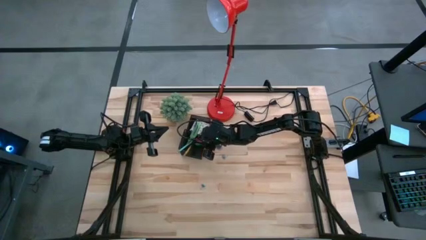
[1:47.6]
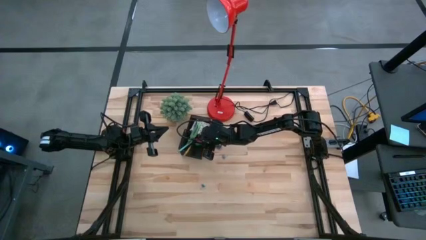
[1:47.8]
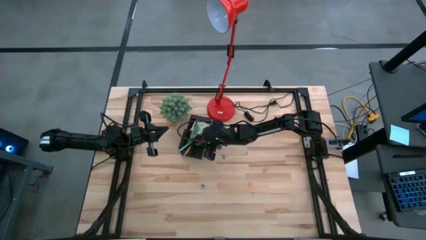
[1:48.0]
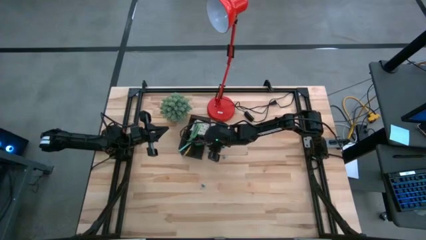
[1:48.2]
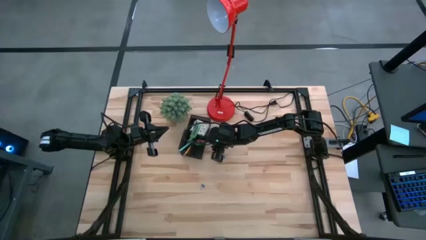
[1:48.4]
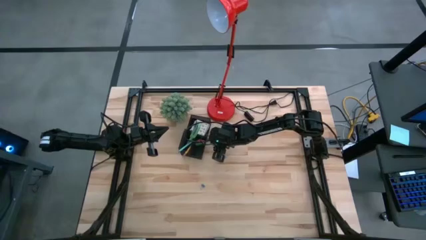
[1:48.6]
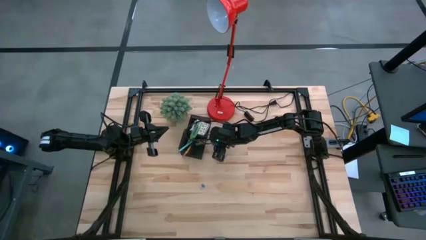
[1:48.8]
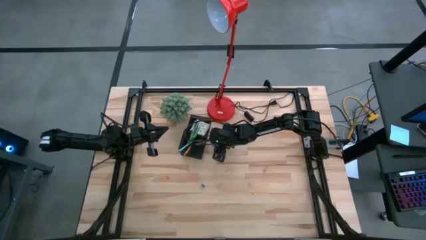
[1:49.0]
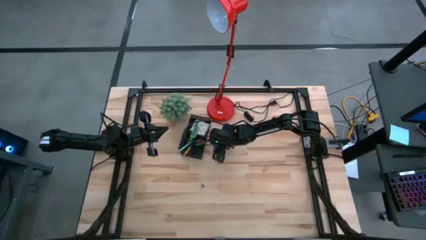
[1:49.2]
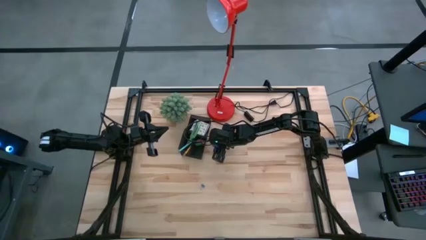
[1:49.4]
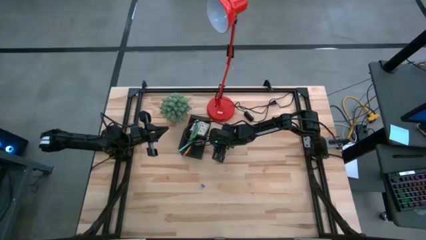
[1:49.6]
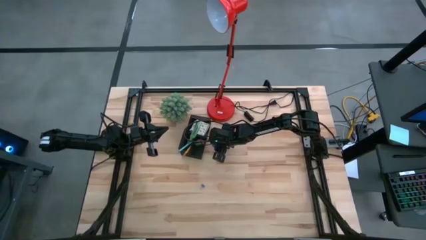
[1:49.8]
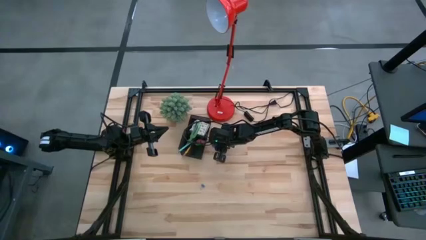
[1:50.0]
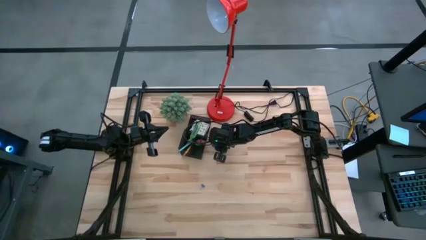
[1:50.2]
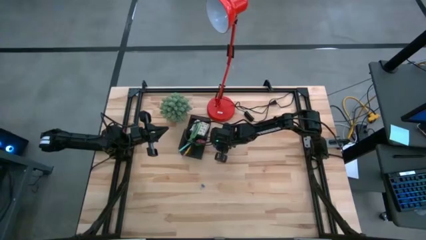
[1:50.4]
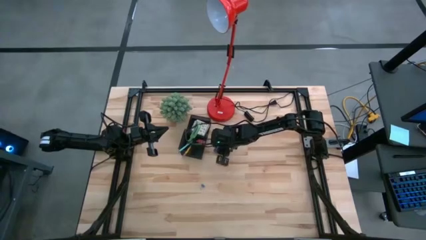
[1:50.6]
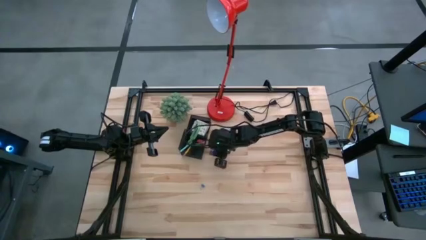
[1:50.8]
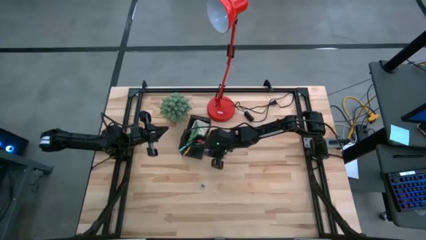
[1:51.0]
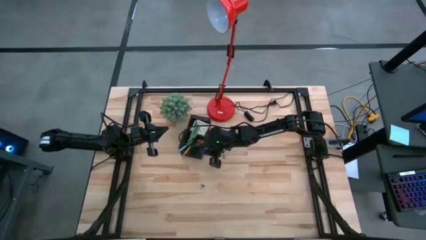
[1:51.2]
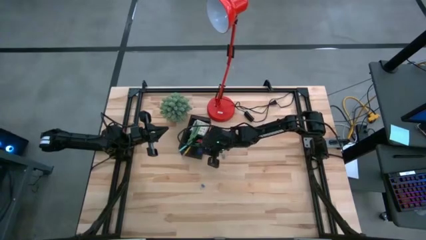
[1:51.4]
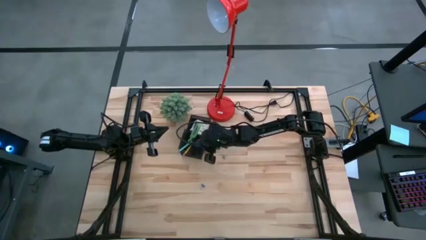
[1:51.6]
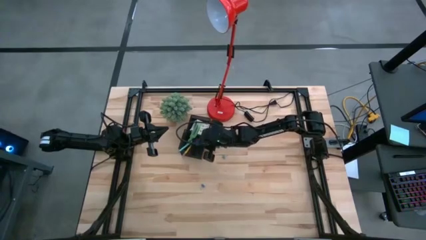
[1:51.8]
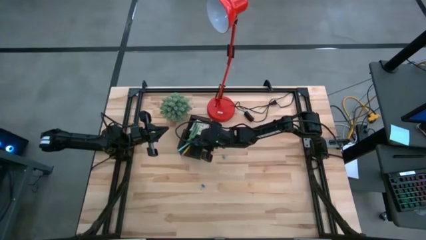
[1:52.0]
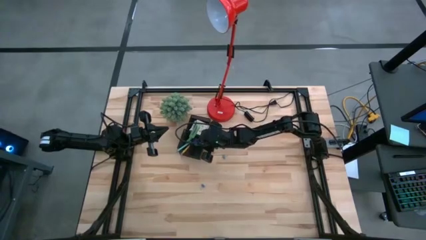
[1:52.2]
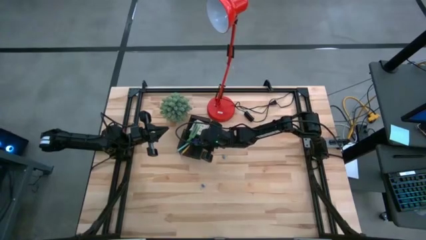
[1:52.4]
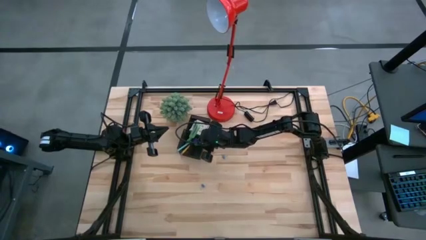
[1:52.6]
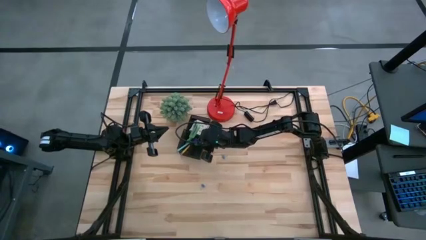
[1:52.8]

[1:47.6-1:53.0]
Task: Pick and place office supplies into organizer
Put the blue eraser in the black desk organizer

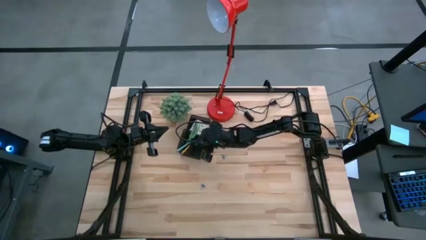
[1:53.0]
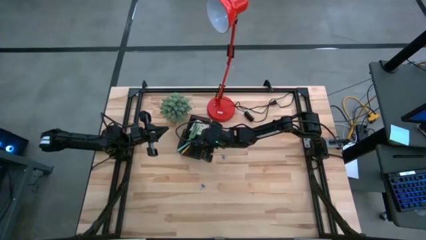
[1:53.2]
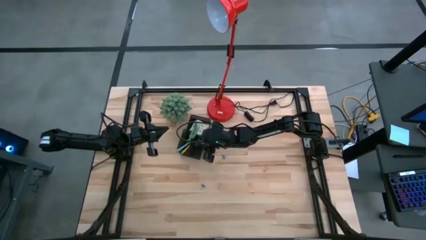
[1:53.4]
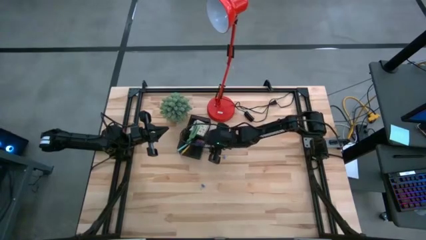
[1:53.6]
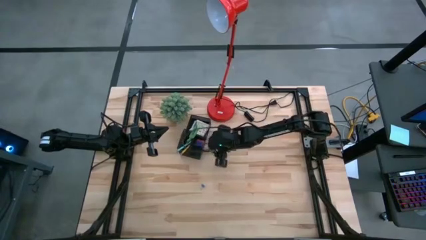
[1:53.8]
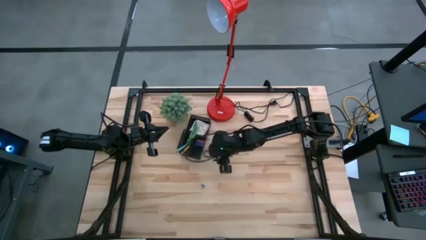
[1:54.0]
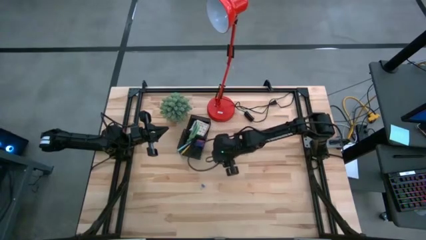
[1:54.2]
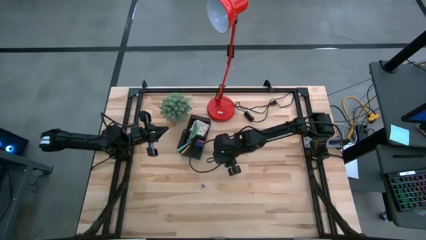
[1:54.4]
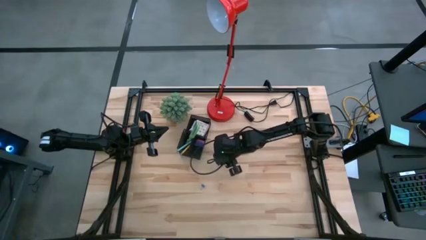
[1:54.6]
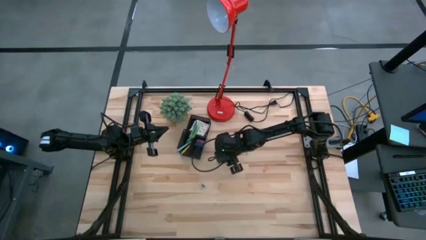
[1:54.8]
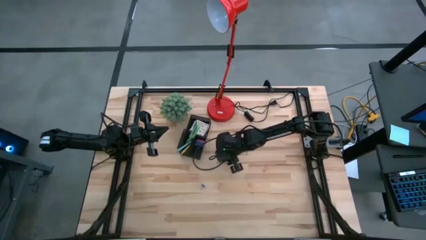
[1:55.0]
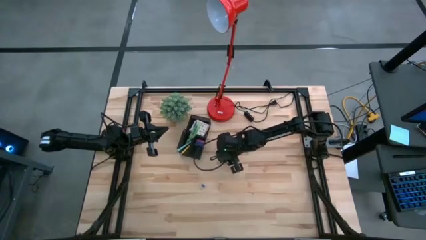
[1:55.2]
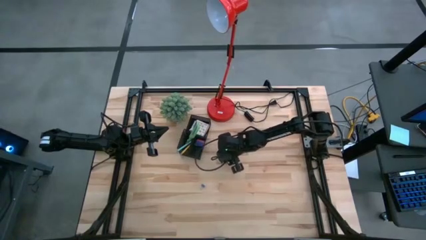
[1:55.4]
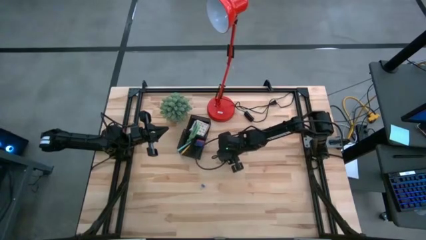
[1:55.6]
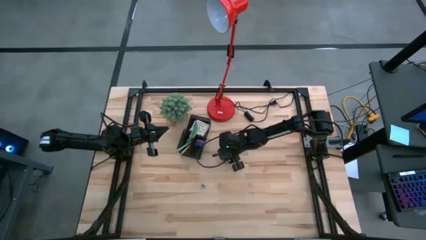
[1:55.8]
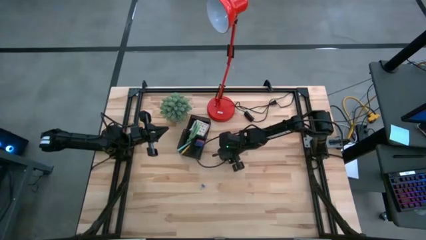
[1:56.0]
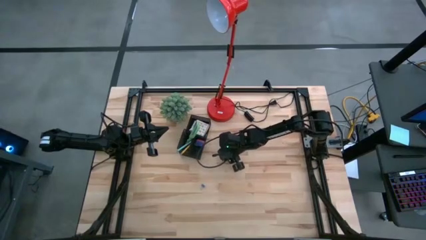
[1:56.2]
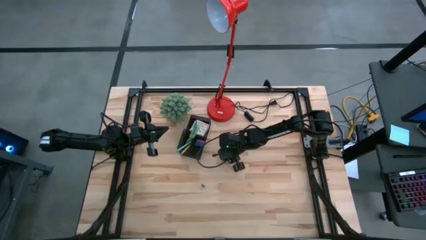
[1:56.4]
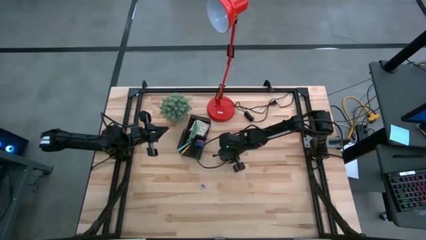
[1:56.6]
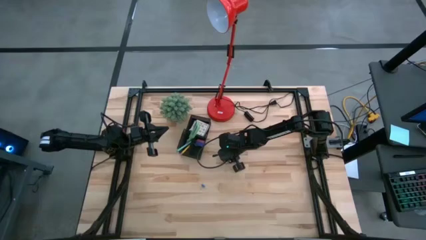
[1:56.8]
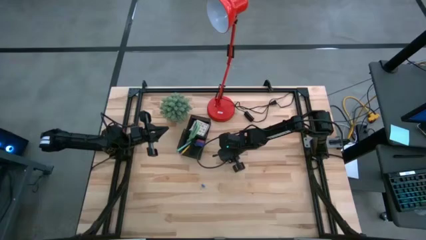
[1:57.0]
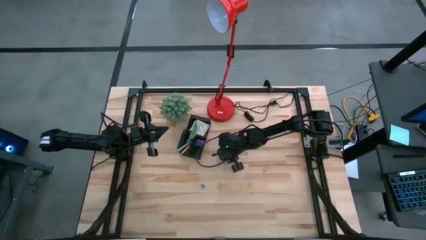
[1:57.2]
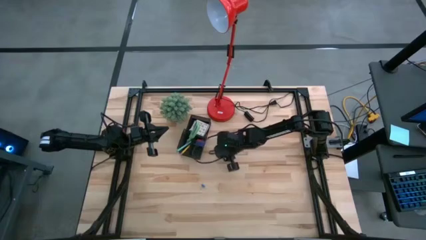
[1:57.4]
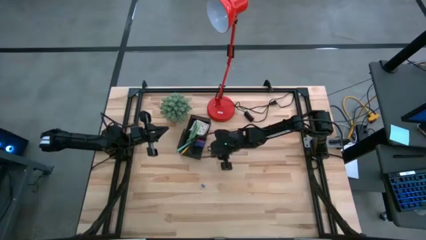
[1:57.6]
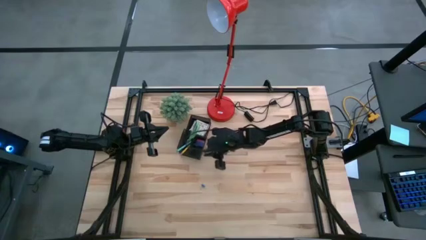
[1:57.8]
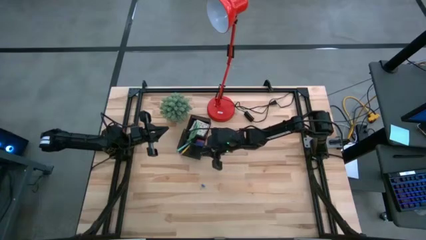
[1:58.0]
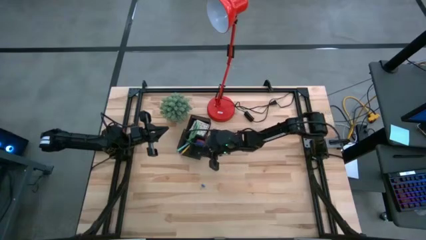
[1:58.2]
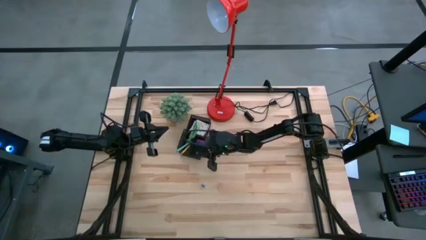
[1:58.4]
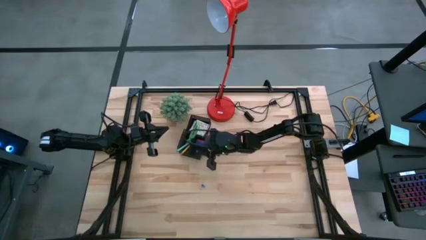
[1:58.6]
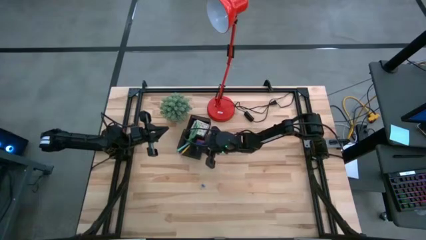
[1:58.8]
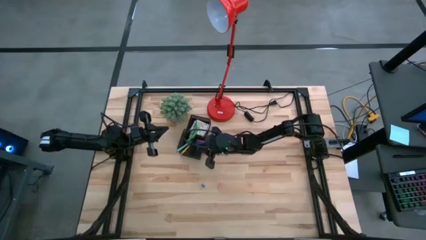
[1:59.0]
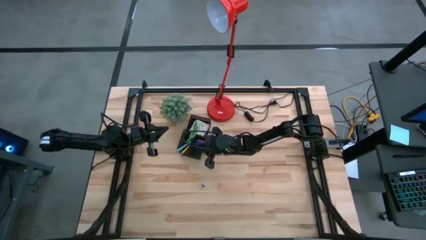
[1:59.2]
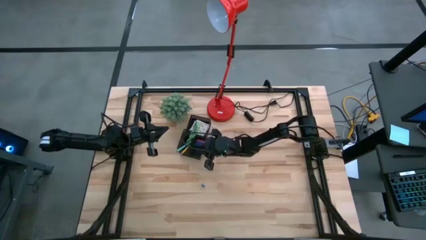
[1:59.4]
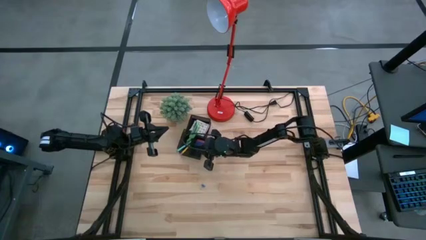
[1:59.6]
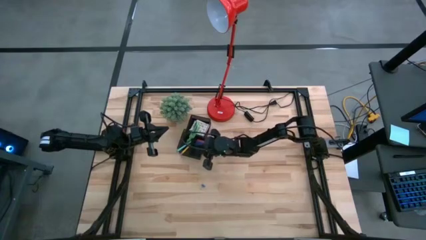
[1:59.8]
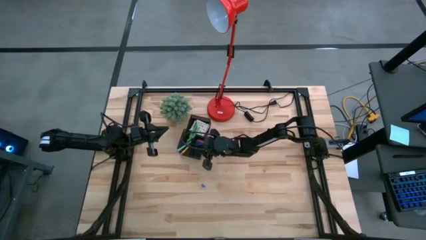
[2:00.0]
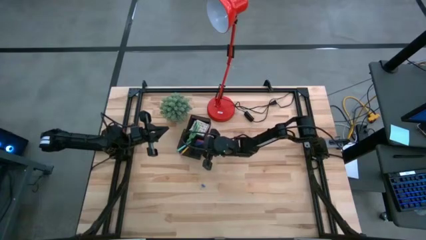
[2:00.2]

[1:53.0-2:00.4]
Put the top blue binder clip in the black desk organizer

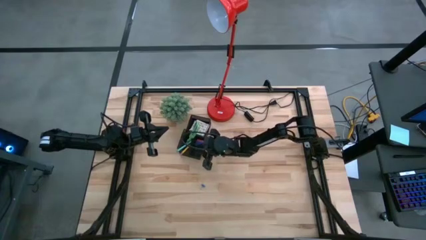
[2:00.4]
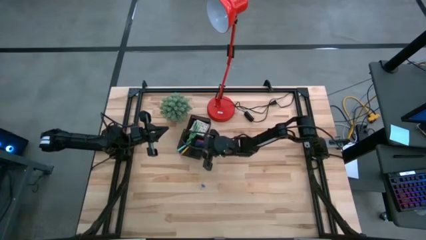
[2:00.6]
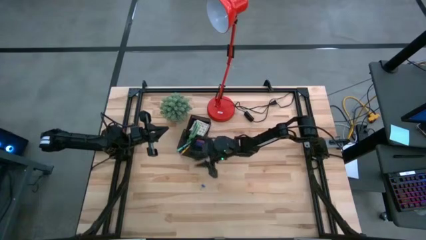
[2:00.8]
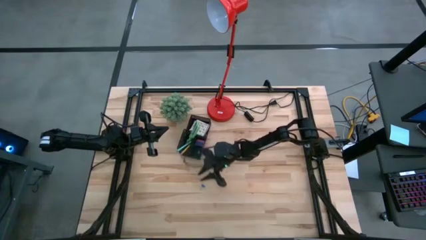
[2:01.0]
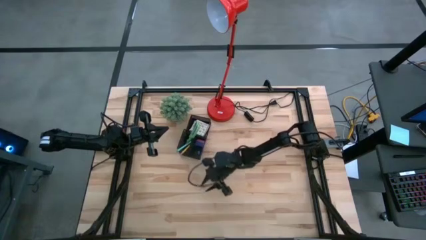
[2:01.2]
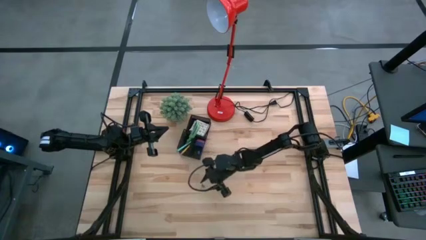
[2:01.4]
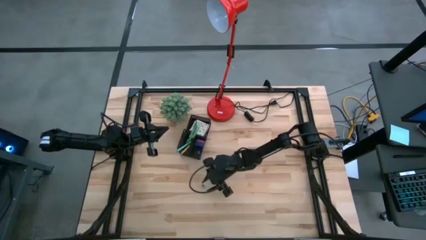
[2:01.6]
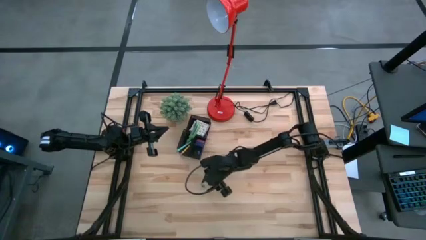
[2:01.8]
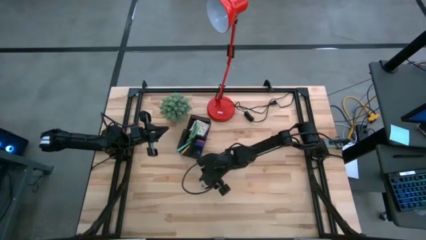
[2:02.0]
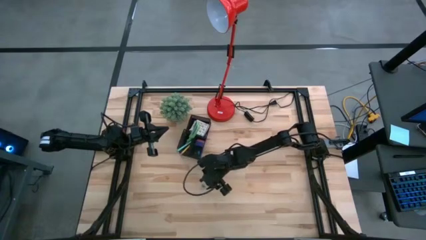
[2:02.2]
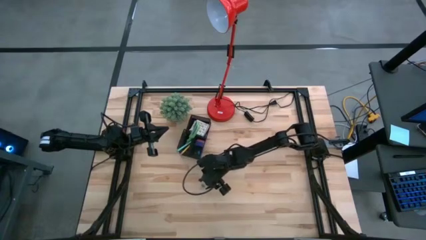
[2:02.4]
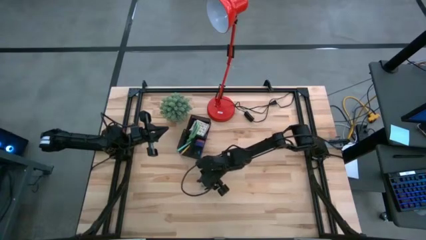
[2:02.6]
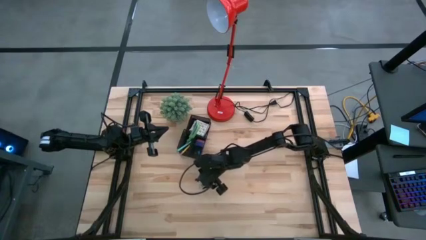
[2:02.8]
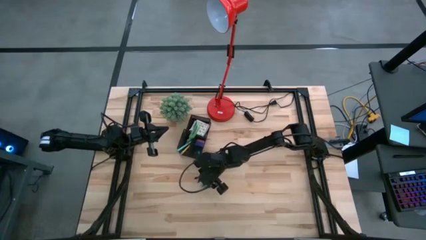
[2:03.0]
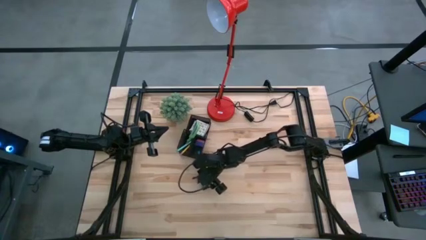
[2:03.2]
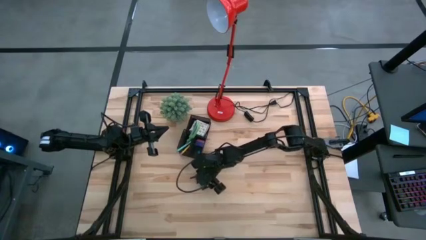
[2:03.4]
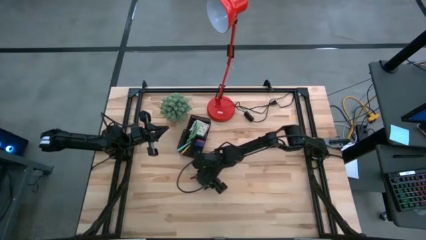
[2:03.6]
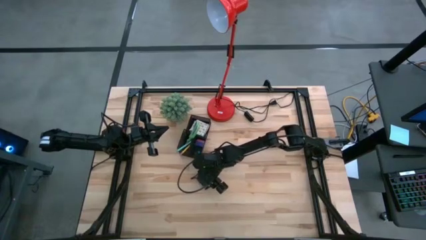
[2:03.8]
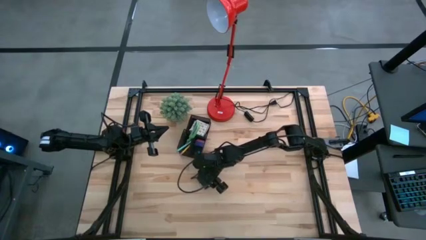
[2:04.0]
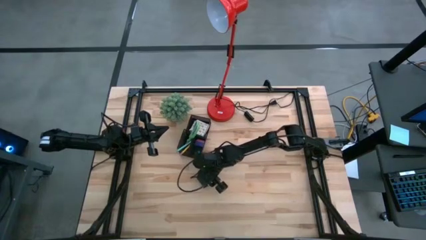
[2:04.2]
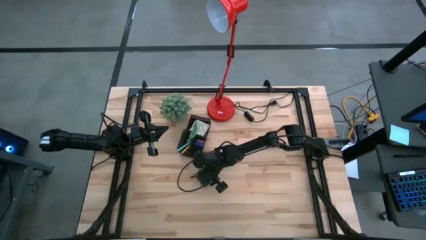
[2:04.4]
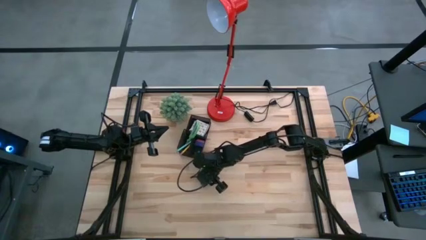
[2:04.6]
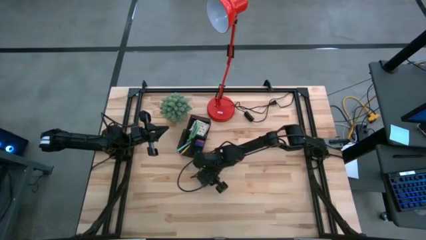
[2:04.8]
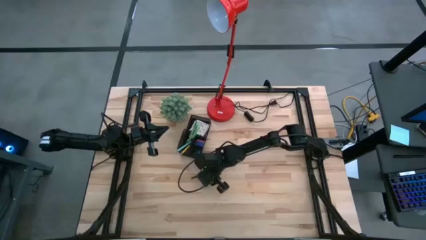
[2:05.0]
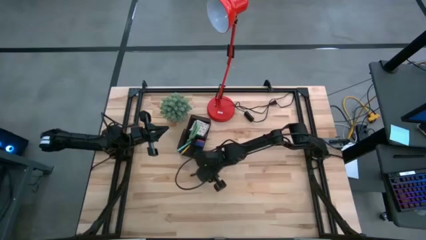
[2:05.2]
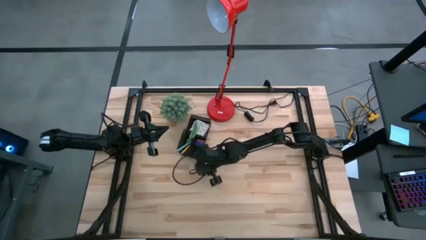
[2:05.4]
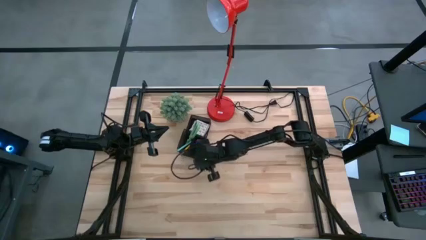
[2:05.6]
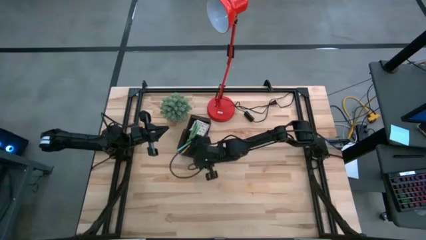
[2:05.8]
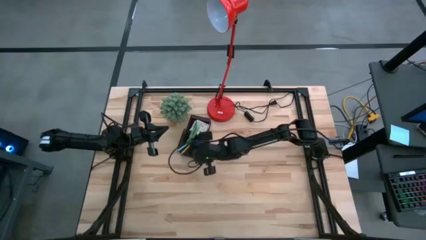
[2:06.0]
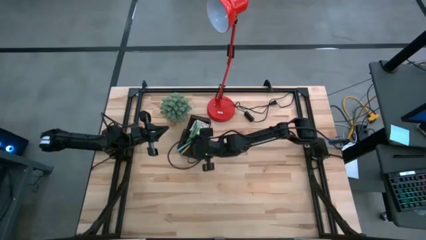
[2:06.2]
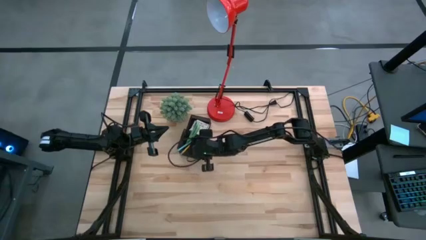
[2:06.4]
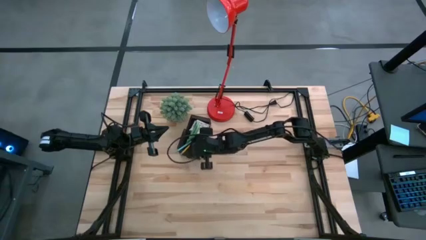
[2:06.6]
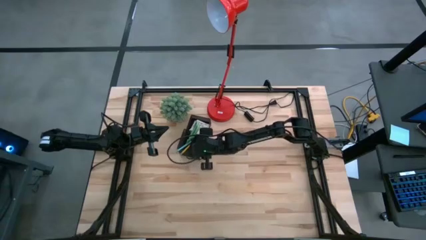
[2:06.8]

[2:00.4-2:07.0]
Put the blue binder clip in the black desk organizer
